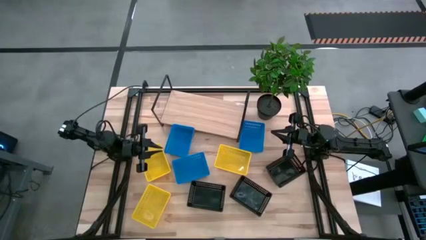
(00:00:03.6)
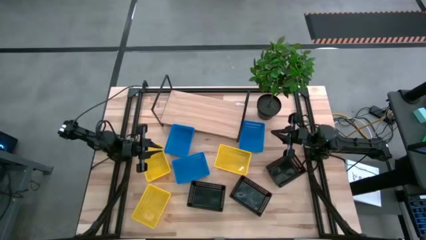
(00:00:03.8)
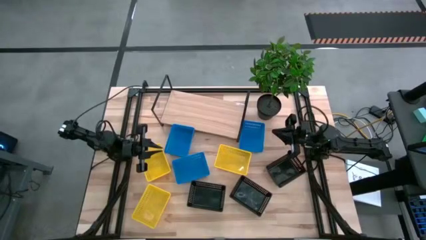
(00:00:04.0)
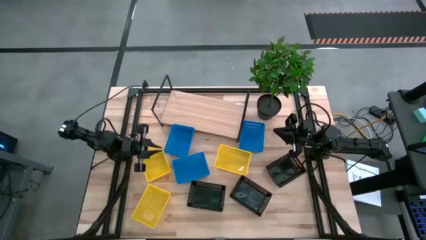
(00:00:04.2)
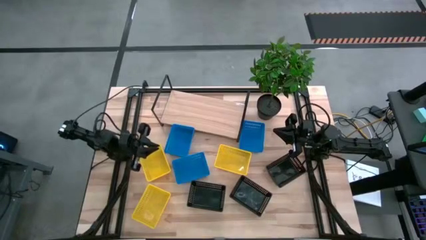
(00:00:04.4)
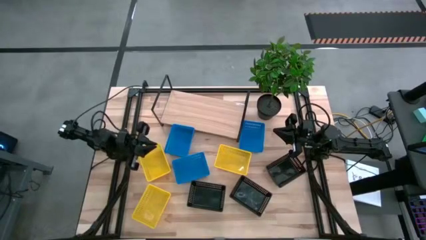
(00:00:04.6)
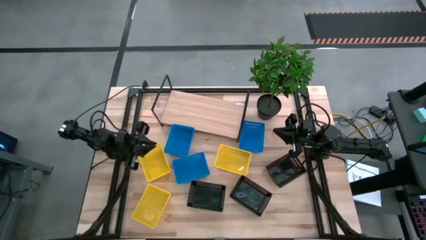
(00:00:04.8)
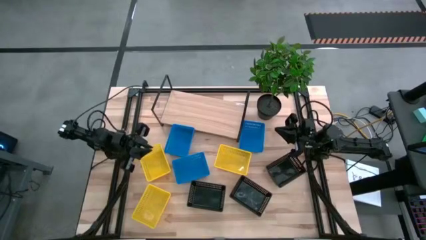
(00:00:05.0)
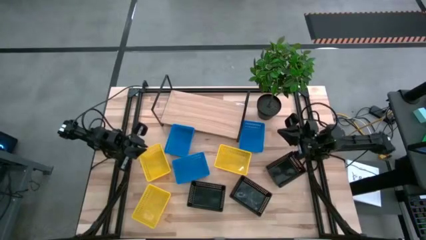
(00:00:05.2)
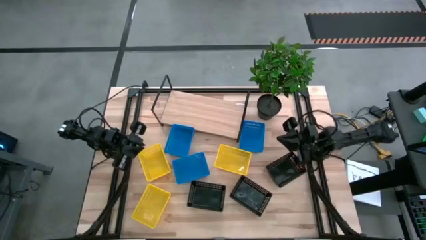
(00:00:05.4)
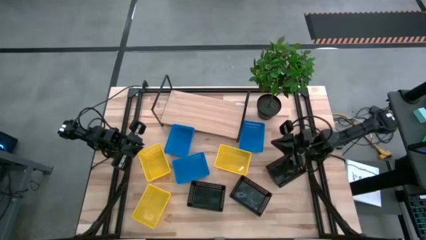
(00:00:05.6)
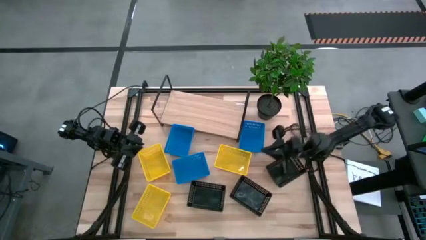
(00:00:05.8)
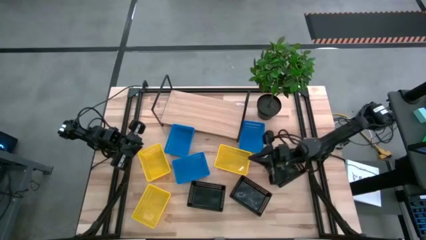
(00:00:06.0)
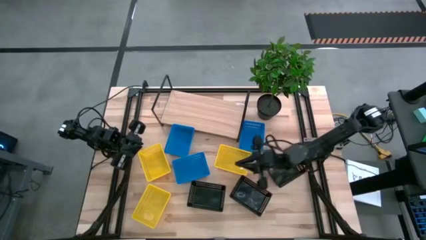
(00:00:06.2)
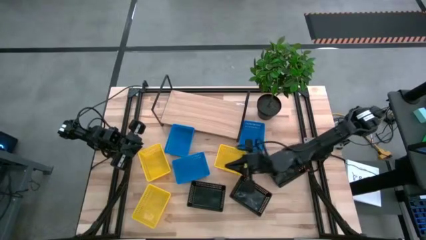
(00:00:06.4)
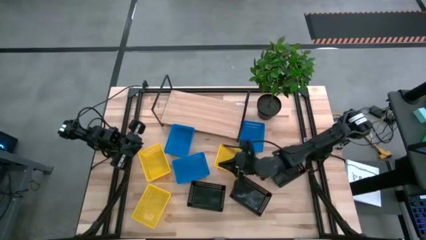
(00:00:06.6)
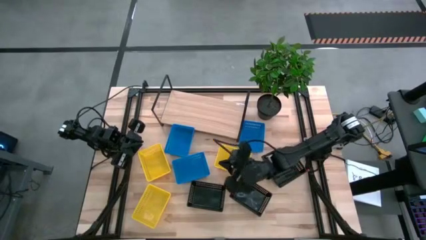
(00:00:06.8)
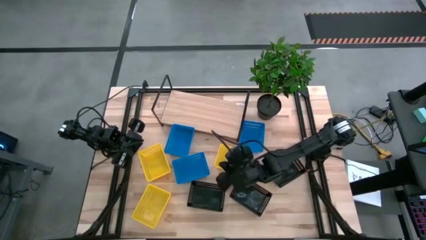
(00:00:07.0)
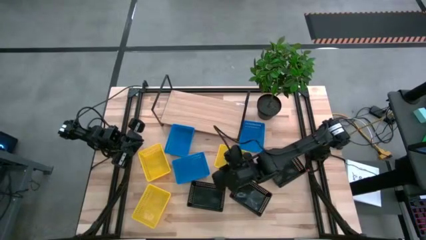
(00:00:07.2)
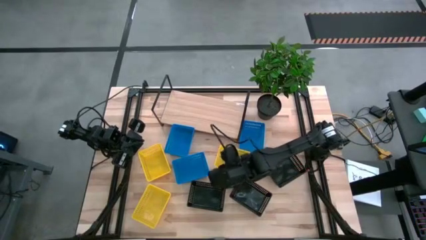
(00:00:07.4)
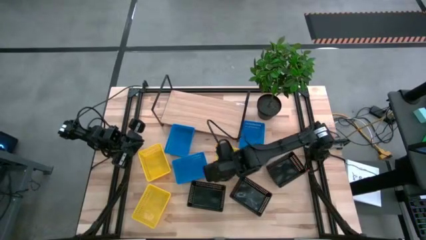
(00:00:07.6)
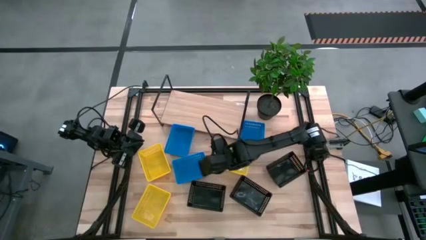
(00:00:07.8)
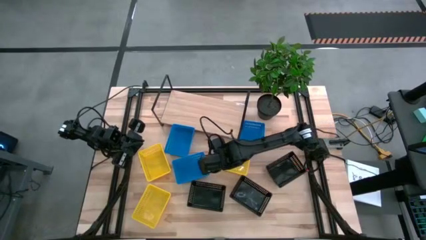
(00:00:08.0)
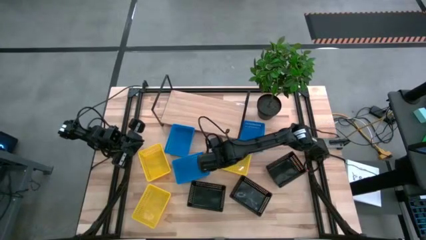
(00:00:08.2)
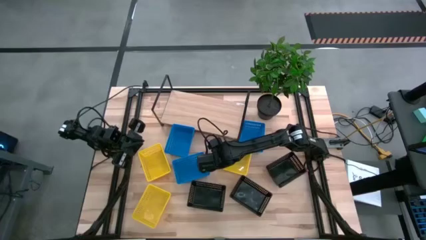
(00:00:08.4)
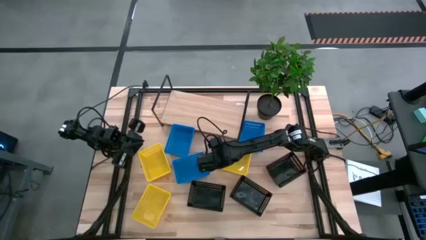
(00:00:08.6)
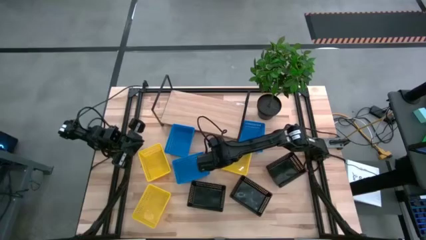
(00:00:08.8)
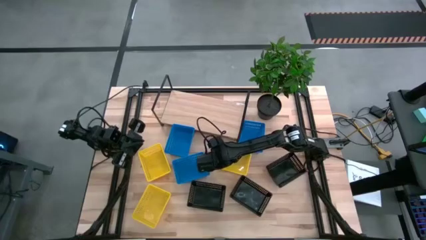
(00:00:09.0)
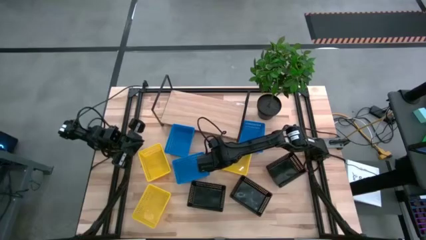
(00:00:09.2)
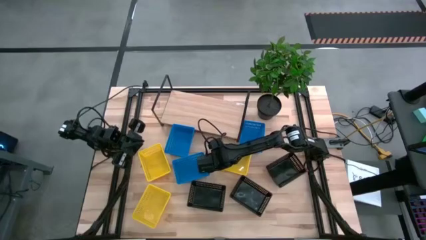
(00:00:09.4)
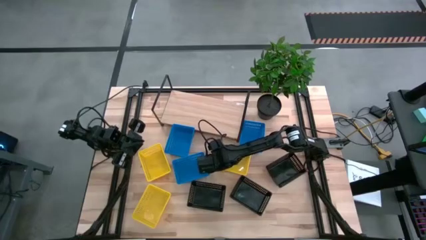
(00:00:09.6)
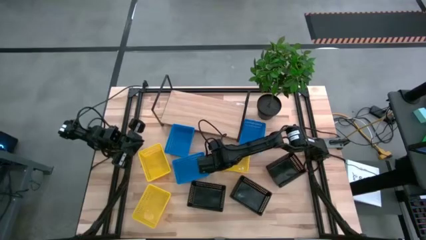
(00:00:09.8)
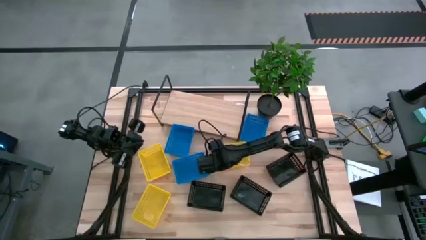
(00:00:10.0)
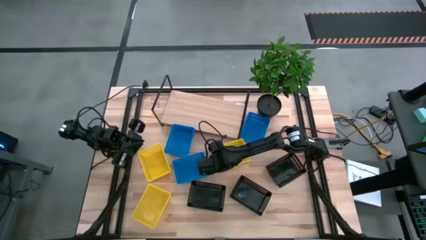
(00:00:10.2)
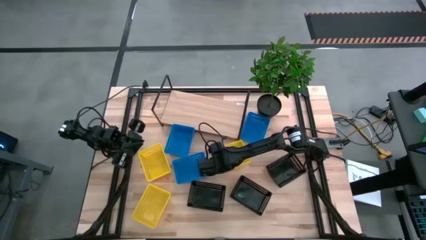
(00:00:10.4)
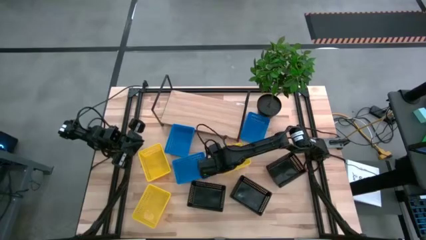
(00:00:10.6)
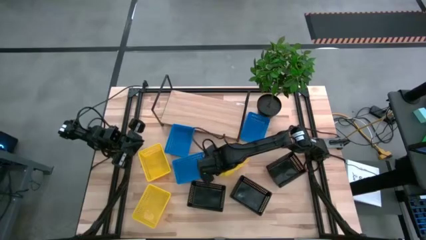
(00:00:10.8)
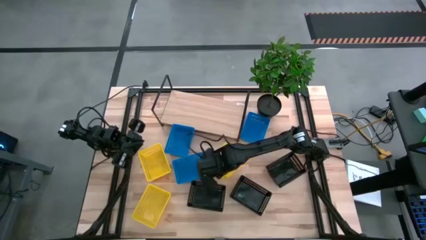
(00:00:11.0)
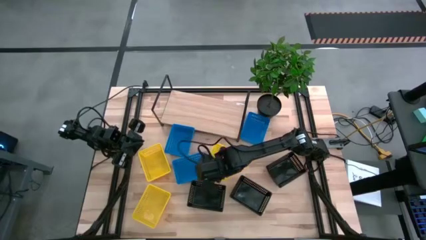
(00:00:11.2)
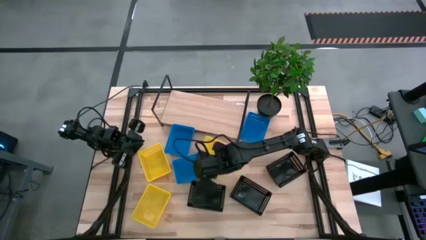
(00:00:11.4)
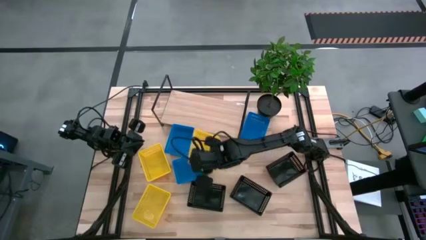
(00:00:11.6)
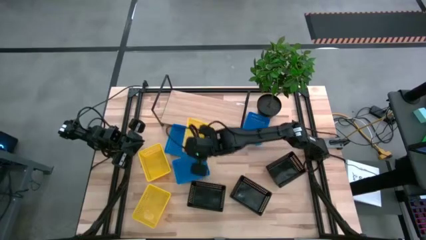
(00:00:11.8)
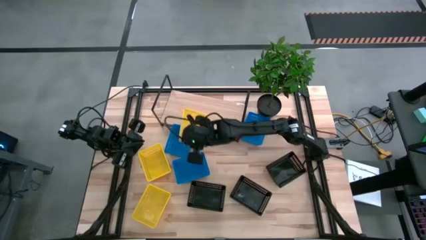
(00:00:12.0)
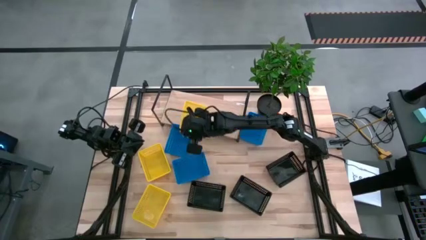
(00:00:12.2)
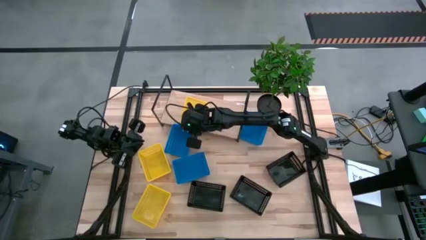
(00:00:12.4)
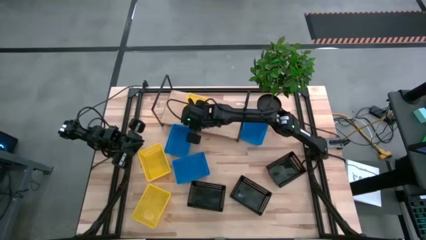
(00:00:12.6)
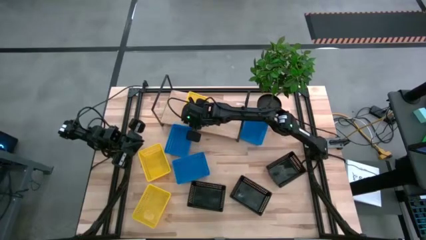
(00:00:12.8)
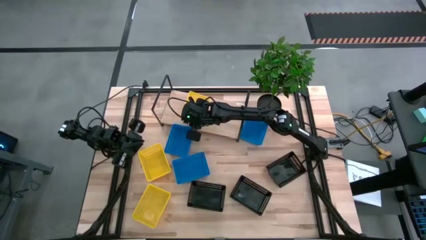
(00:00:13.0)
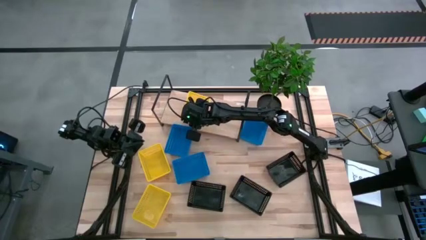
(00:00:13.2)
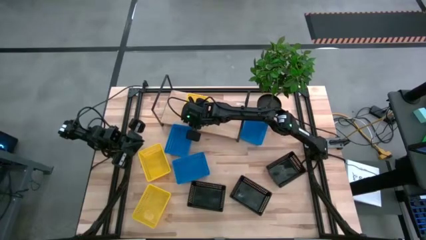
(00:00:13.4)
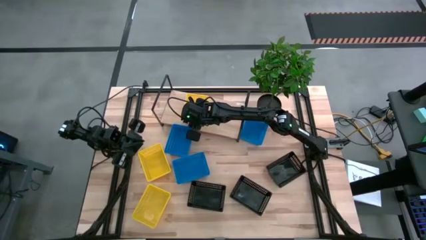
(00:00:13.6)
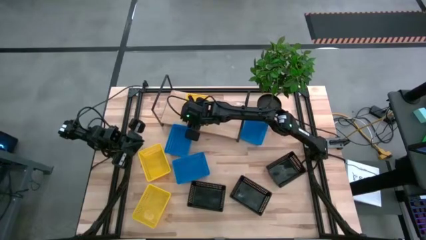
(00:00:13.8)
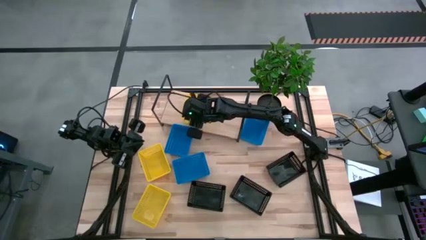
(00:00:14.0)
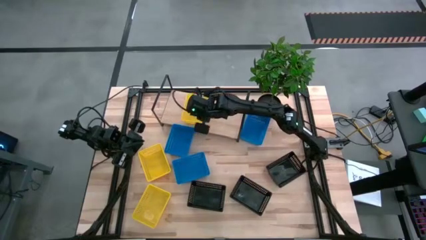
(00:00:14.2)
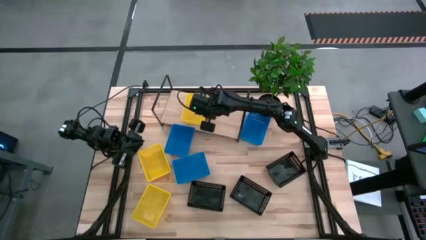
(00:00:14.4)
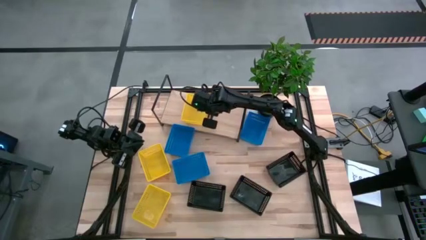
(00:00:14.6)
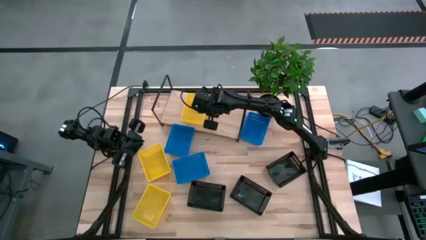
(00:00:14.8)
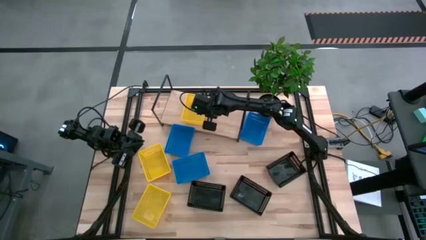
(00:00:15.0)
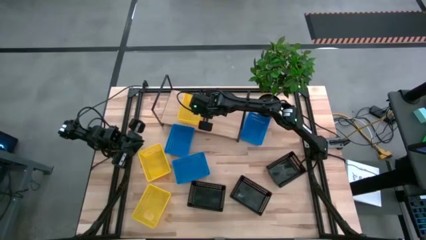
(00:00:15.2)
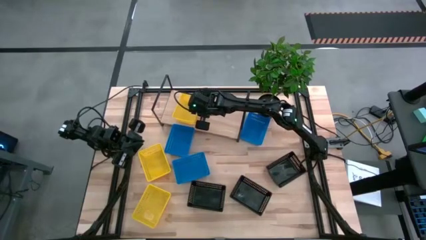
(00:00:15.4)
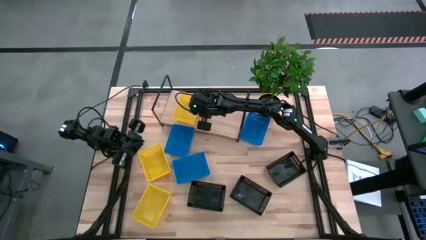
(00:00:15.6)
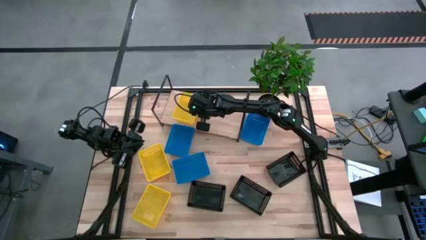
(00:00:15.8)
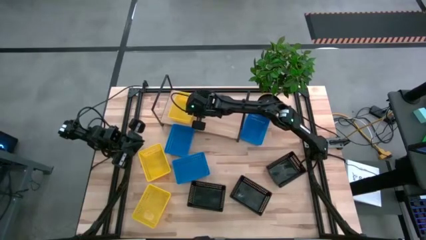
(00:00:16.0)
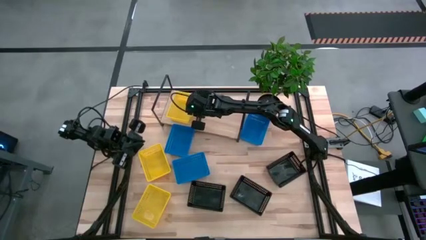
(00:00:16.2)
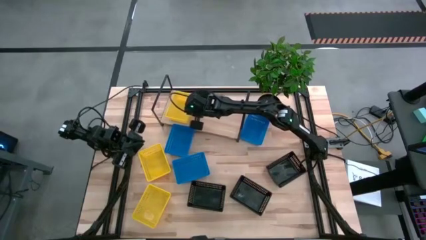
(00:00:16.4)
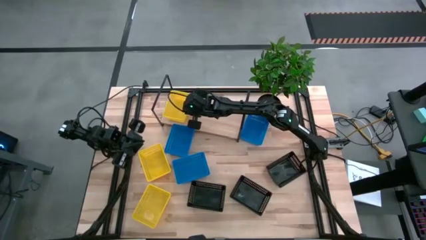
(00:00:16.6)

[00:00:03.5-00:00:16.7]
Task: Stack baskets on shelf by color
Put the top right yellow basket on the shelf

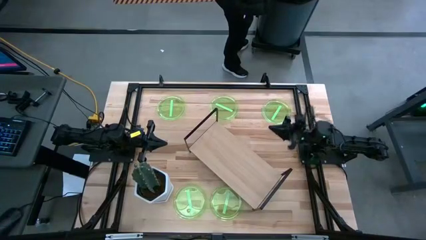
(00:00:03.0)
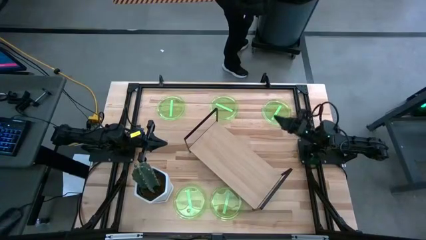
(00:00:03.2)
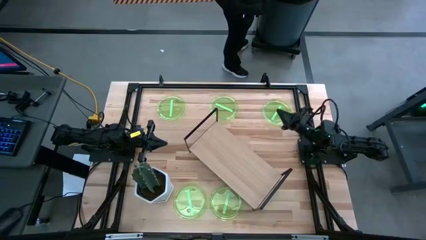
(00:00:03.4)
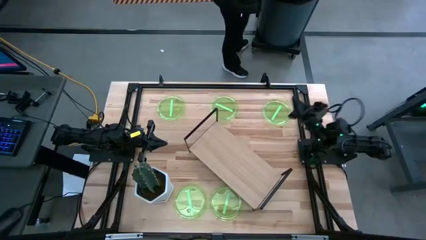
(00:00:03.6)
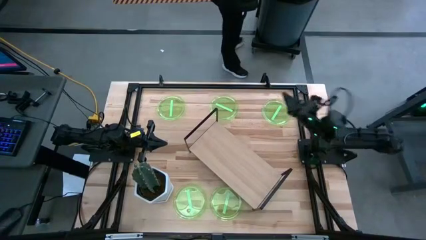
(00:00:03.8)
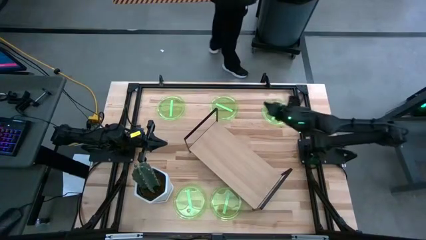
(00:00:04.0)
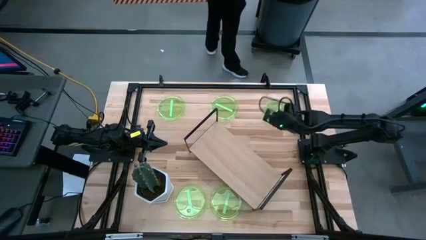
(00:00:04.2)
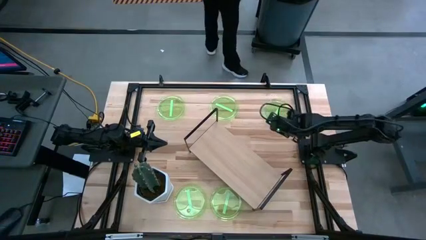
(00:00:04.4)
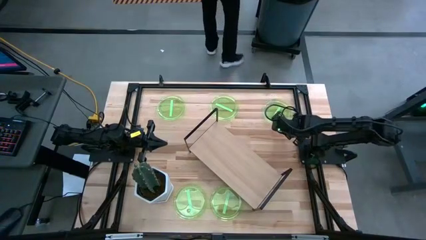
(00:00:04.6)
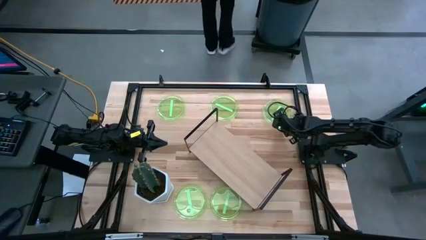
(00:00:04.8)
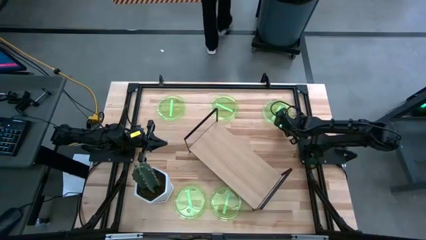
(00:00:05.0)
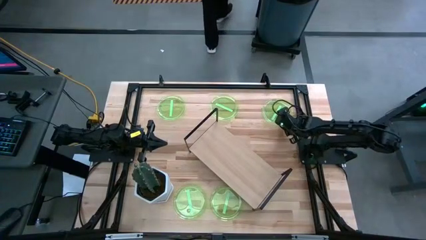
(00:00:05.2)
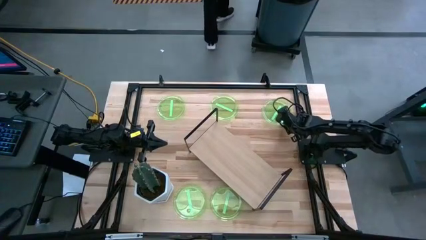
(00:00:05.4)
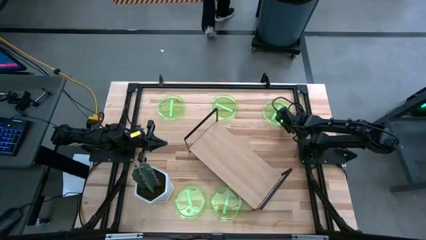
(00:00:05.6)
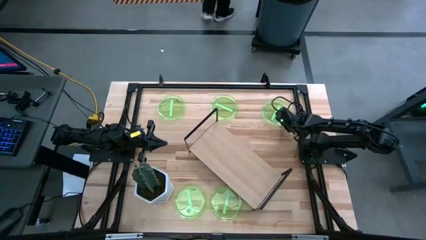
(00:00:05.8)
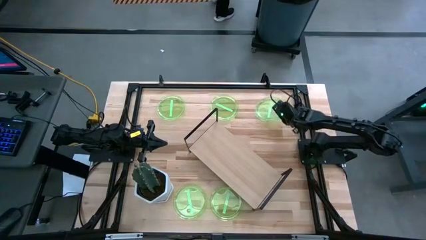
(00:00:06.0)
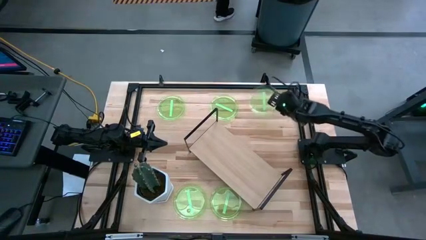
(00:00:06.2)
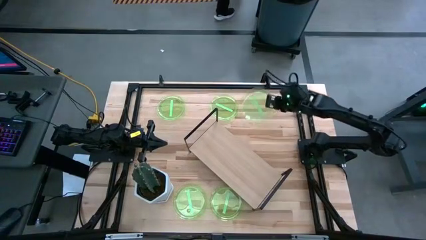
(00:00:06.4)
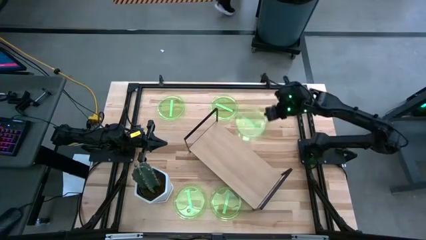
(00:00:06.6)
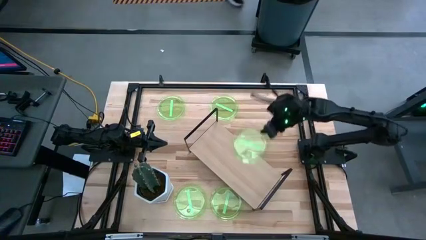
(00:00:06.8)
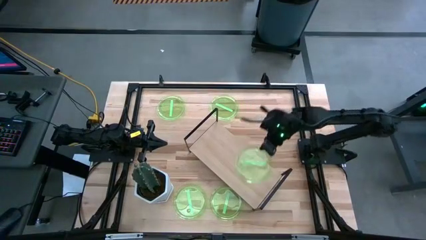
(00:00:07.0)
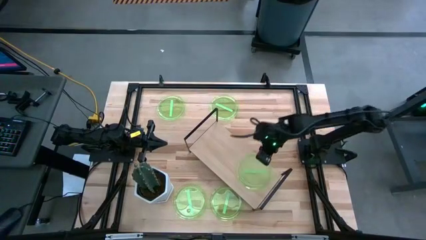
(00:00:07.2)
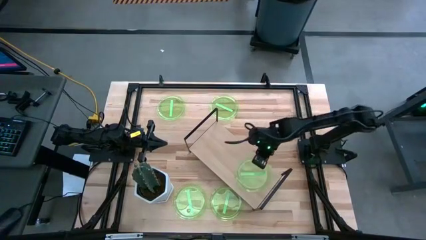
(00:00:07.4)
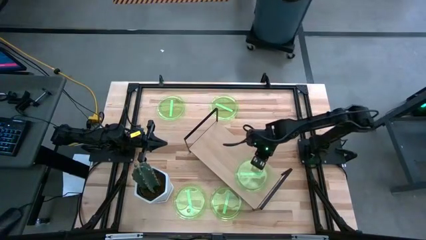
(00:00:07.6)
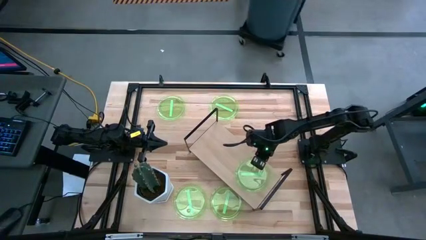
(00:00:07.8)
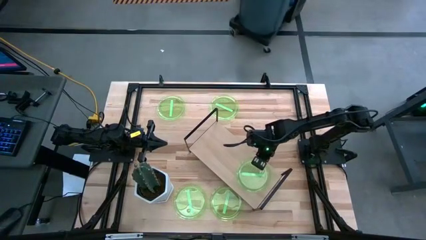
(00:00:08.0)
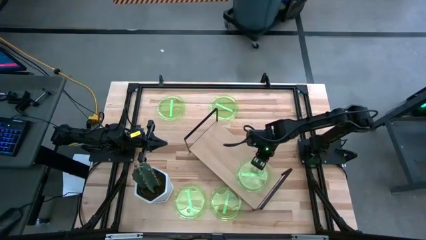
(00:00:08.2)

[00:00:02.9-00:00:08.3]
Task: Place and stack plates onto a shelf
Put the top right transparent green plate on the shelf
